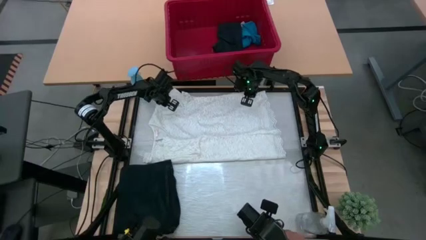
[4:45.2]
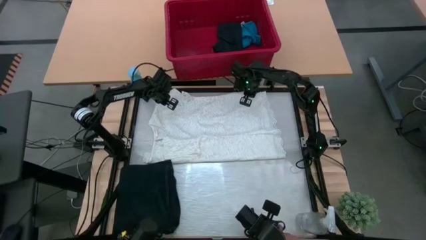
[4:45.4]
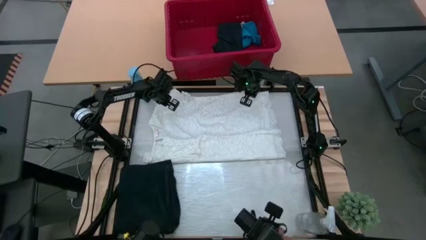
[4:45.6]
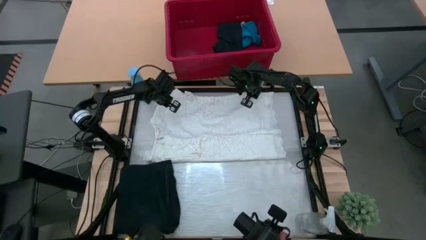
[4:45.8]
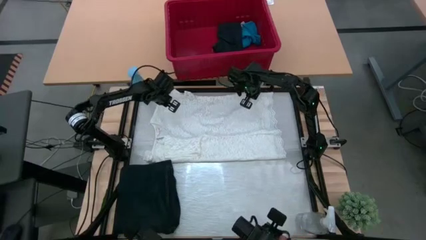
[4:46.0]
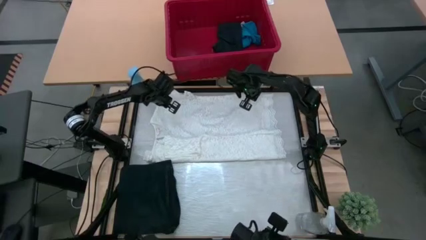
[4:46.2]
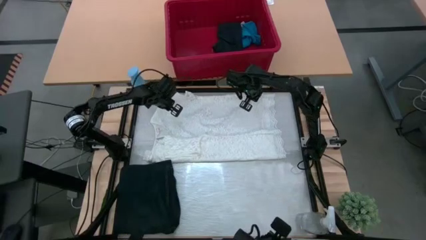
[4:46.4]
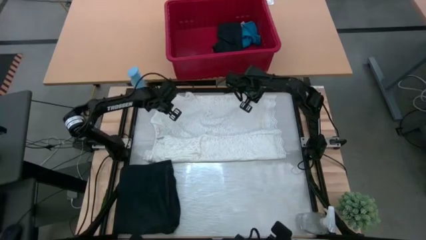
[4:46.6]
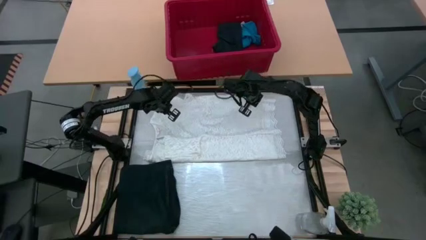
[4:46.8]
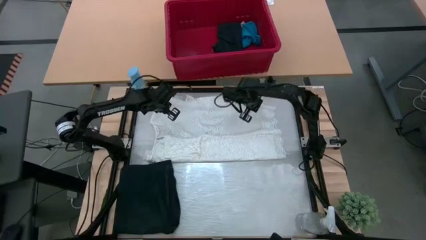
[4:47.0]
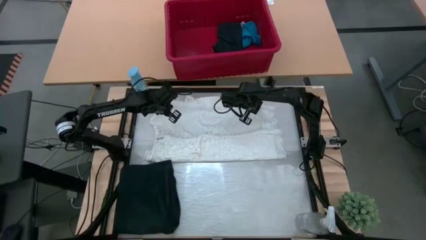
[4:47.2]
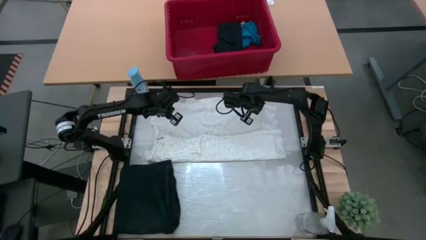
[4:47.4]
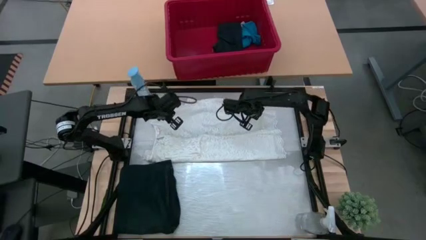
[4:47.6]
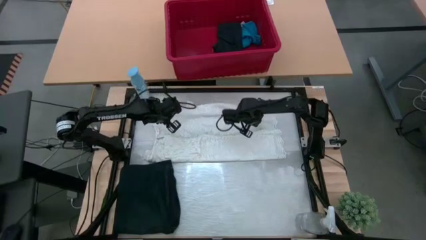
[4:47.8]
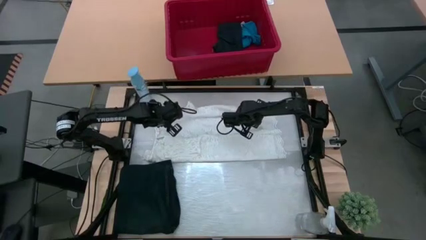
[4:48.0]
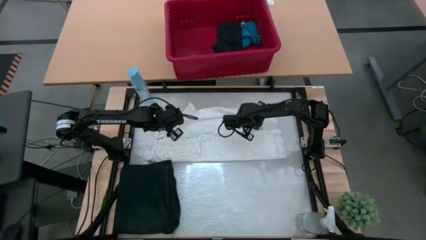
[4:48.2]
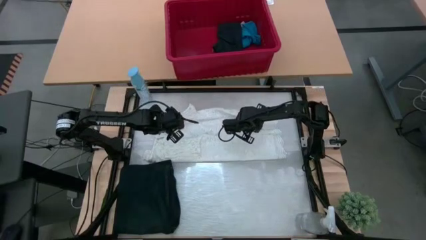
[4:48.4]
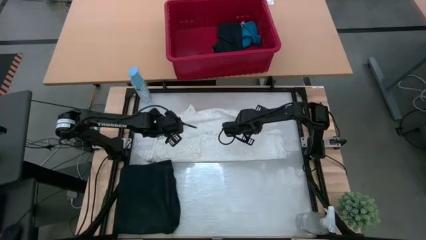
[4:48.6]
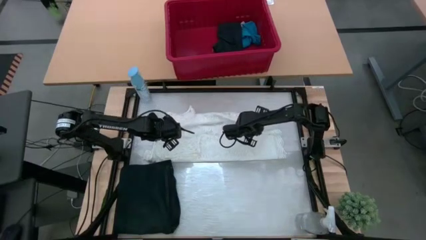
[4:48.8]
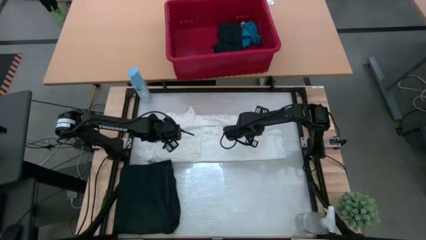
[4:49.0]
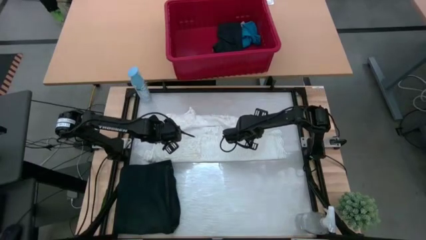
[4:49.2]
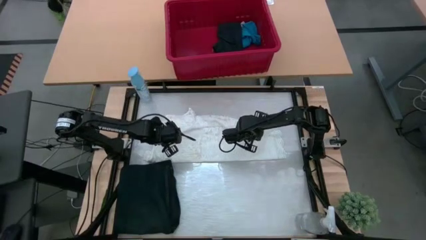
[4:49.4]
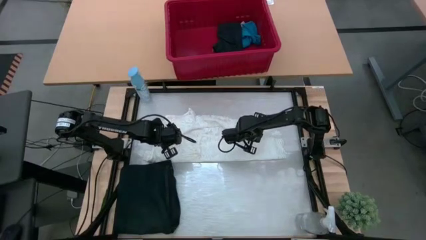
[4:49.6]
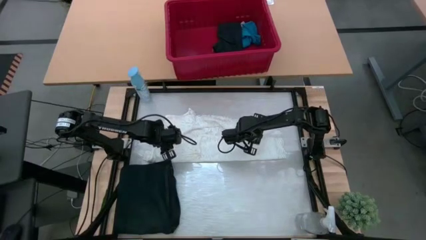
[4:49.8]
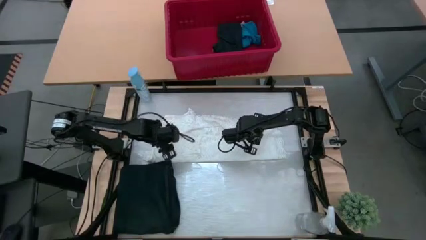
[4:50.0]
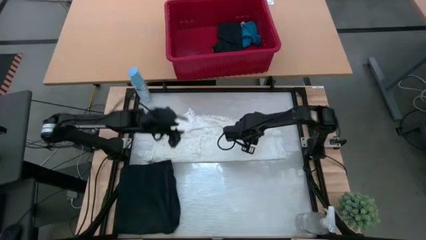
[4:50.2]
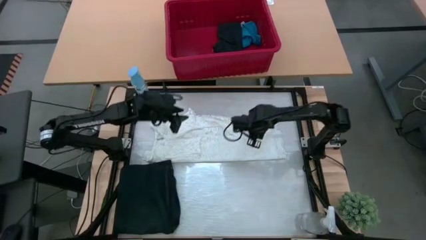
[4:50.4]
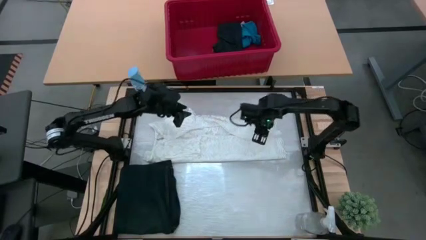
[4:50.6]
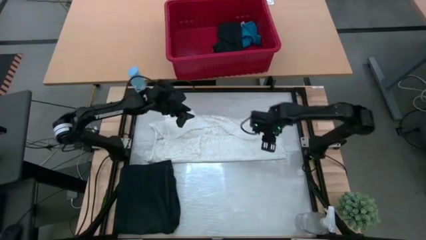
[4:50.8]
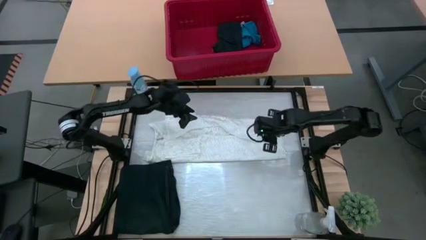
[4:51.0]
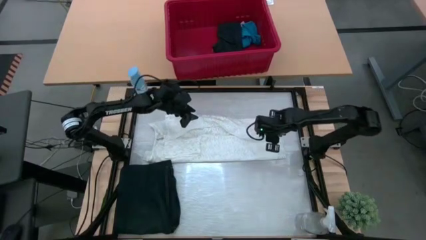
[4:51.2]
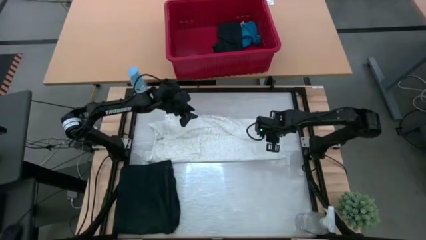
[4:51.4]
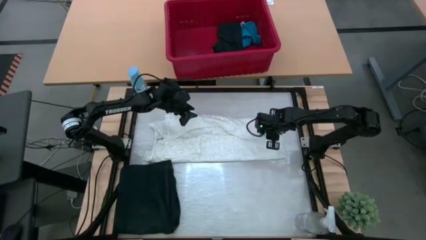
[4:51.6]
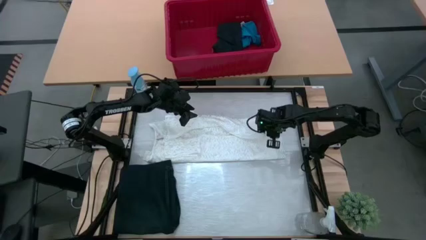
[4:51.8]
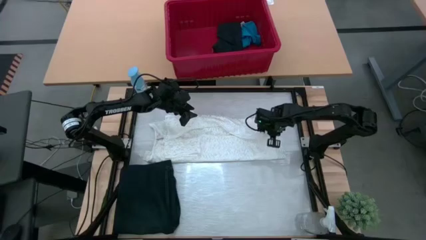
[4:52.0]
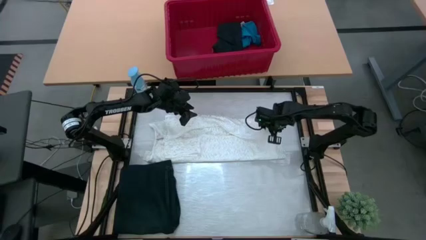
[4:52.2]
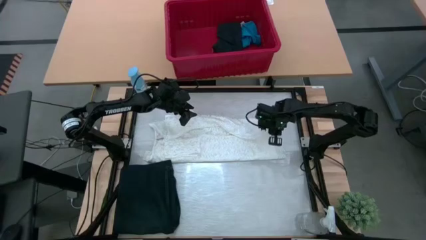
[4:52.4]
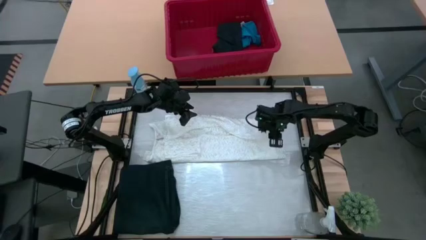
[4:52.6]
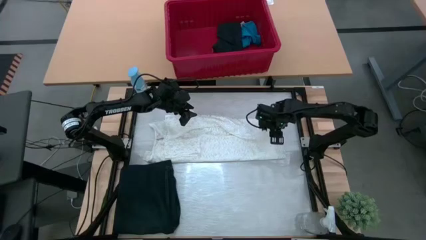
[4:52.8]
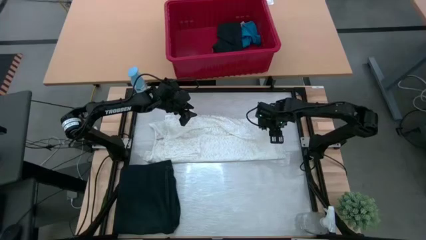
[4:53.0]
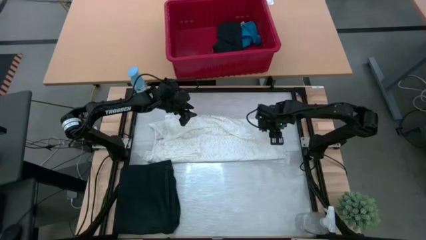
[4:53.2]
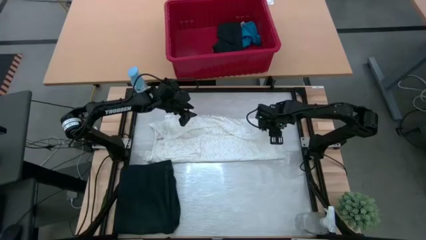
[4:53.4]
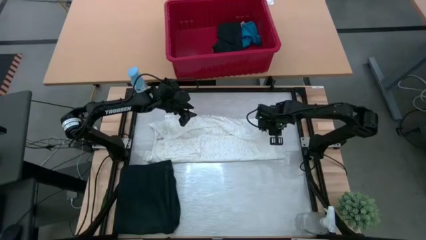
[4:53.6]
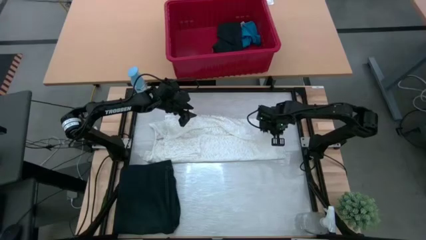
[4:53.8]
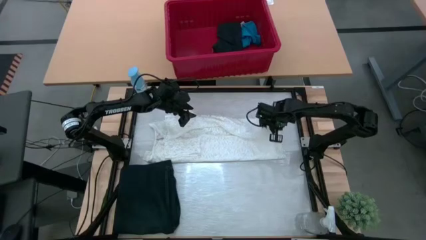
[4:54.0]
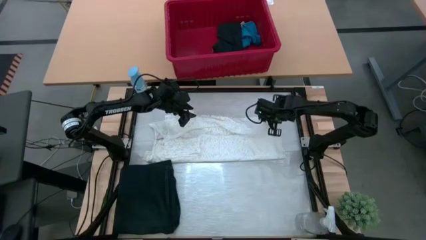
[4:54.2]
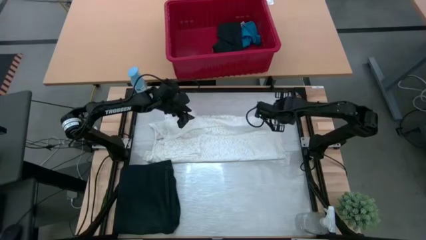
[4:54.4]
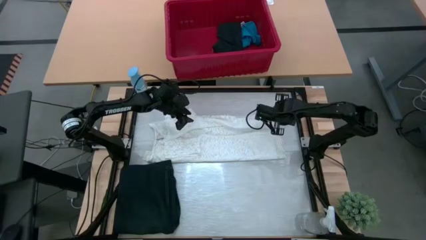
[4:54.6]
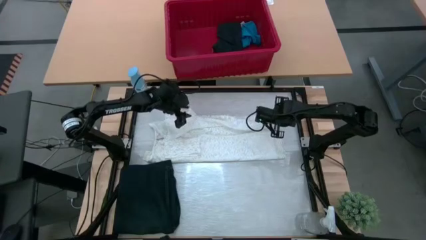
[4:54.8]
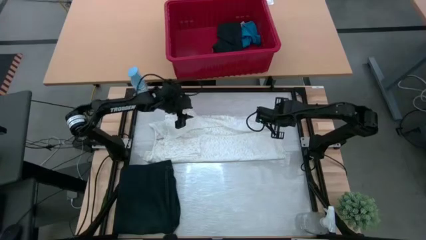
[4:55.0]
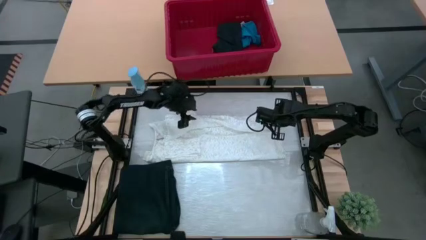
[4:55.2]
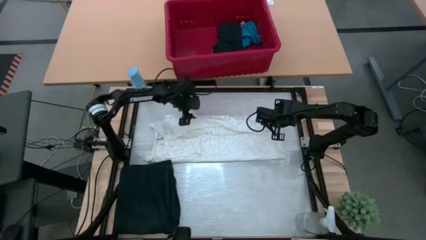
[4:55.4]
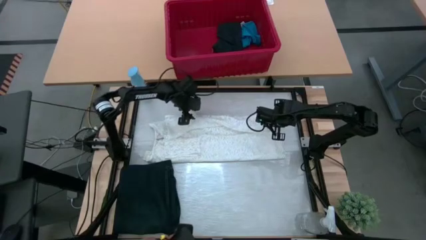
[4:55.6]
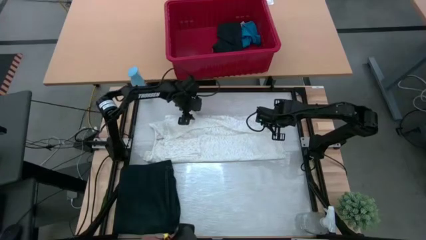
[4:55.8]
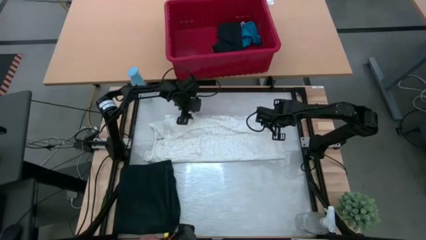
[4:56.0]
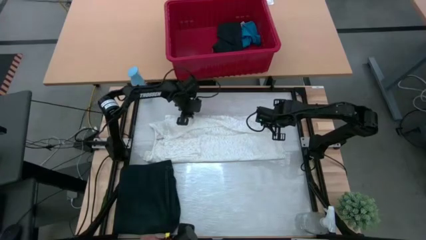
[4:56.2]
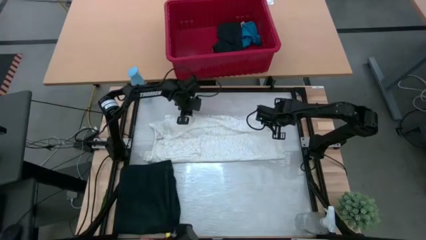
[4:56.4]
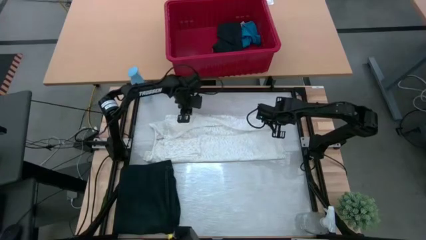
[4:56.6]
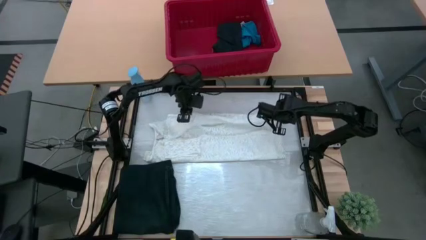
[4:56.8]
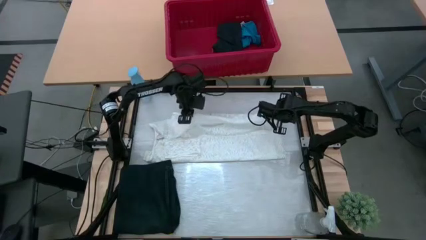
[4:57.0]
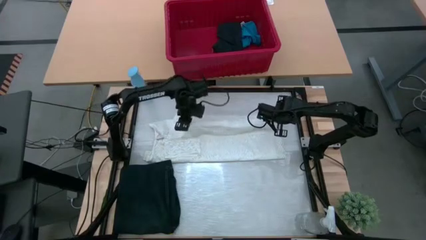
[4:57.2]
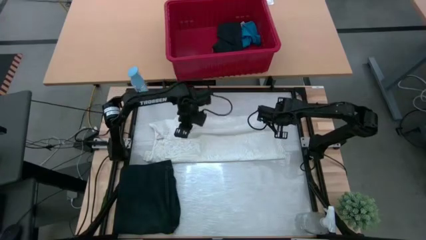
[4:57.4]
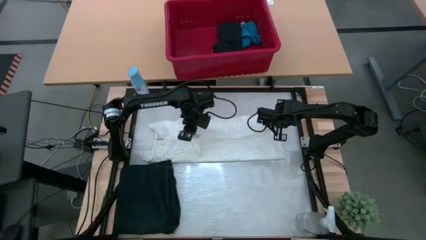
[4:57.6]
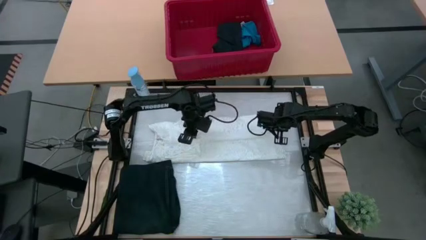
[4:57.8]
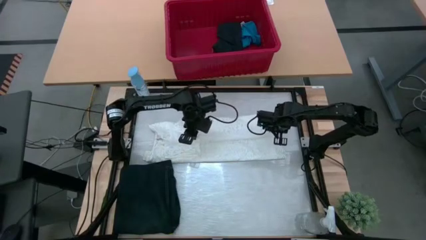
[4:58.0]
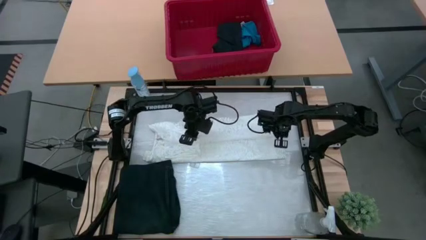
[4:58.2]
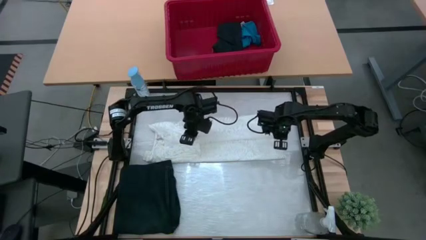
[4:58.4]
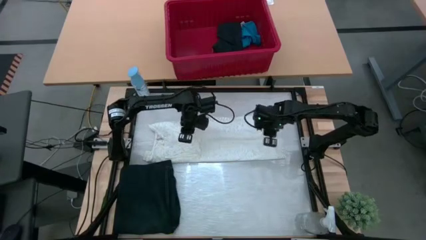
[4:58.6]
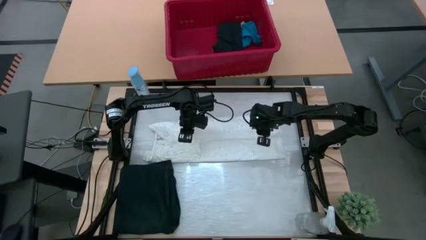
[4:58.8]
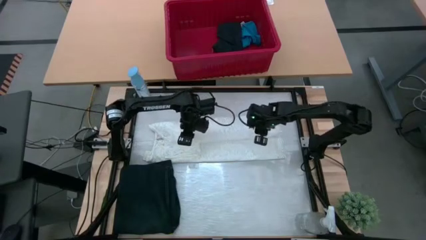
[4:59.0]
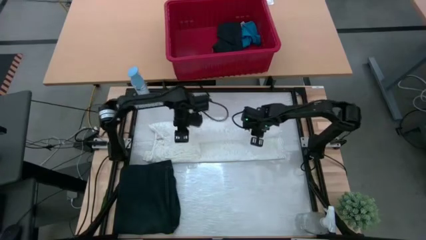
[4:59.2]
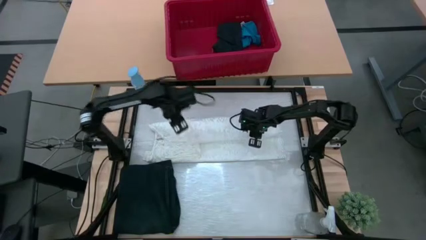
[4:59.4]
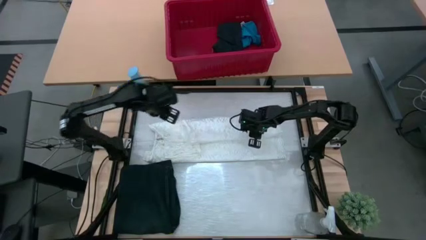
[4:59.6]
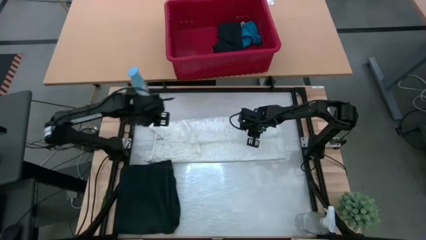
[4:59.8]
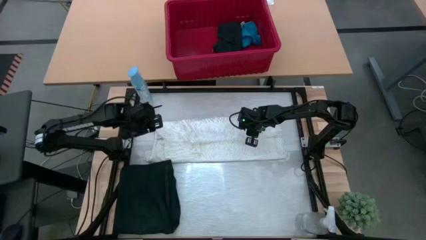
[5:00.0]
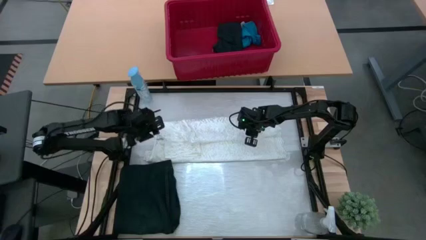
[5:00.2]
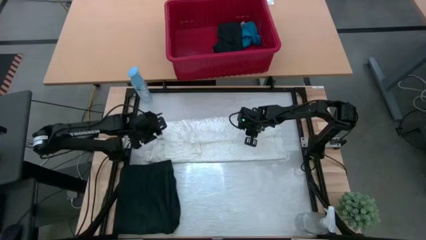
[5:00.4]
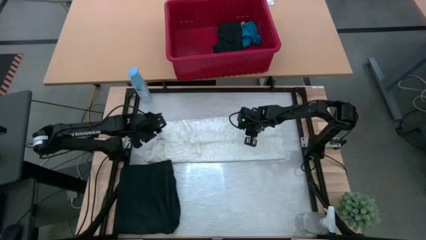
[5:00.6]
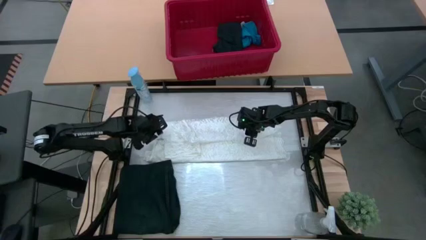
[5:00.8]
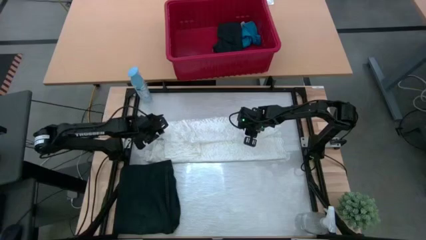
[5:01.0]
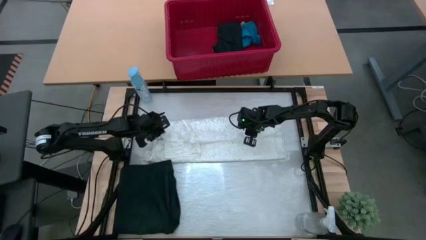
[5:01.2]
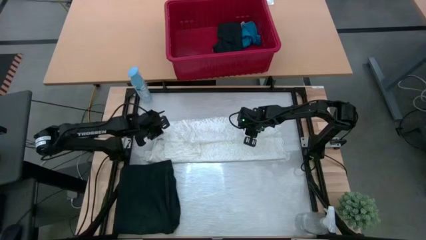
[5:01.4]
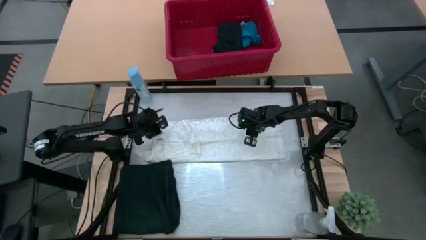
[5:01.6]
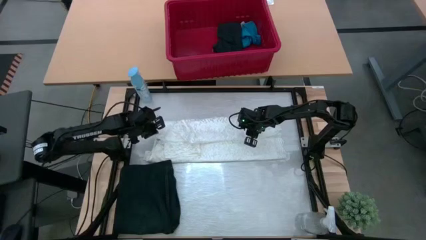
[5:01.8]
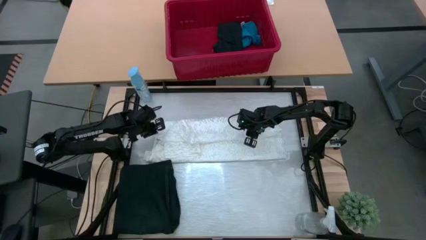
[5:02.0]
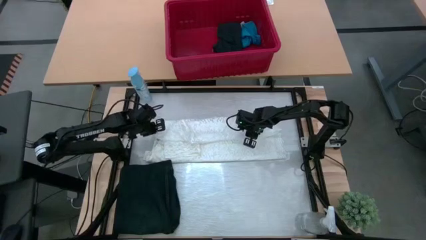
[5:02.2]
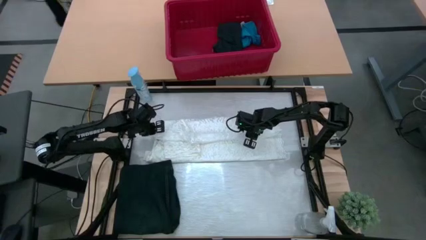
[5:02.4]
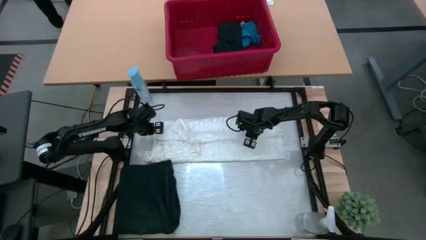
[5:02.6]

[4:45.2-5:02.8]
Task: Fold Laundry from Bin
Fold the white dress from the red bin
